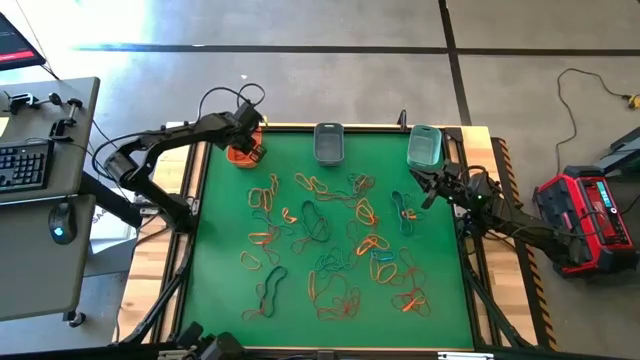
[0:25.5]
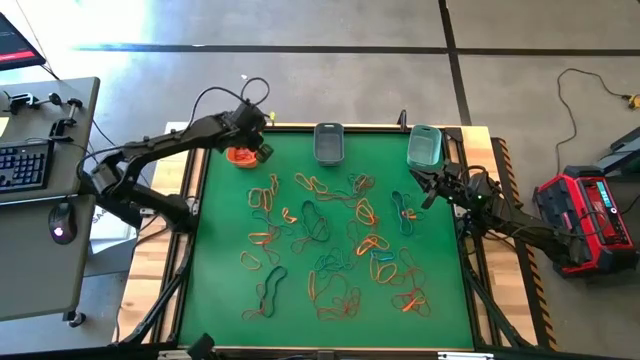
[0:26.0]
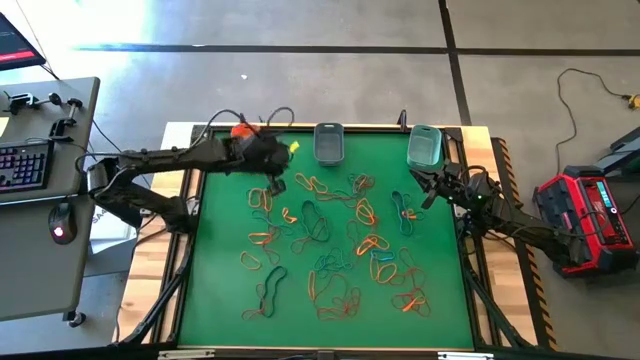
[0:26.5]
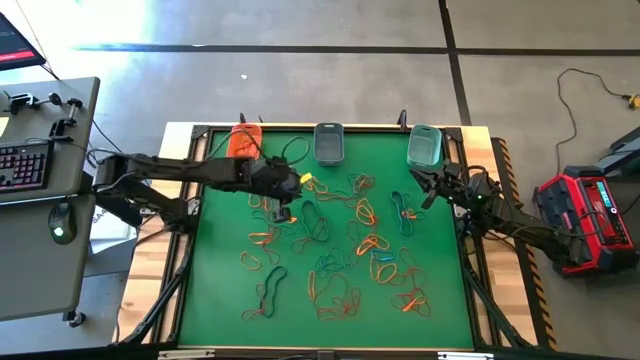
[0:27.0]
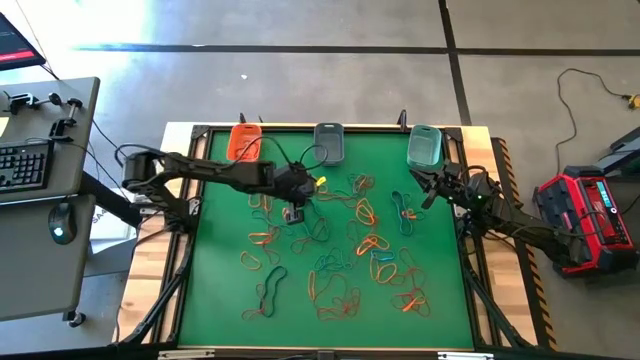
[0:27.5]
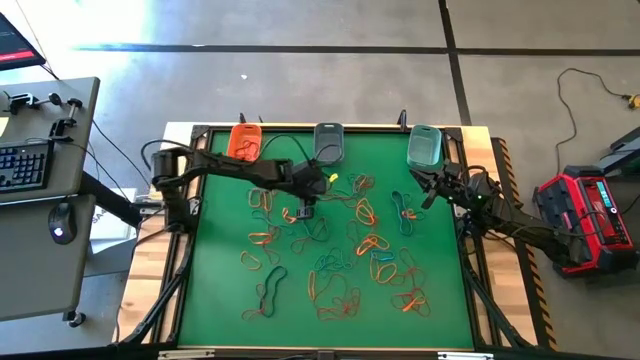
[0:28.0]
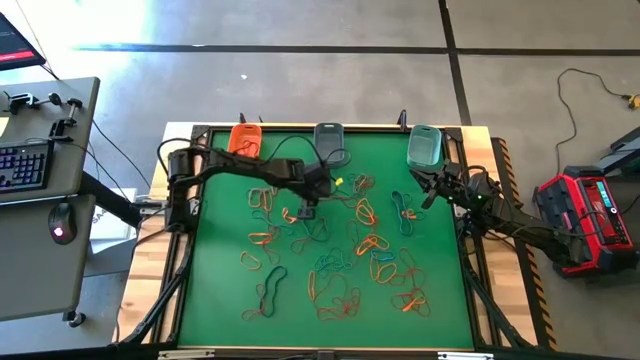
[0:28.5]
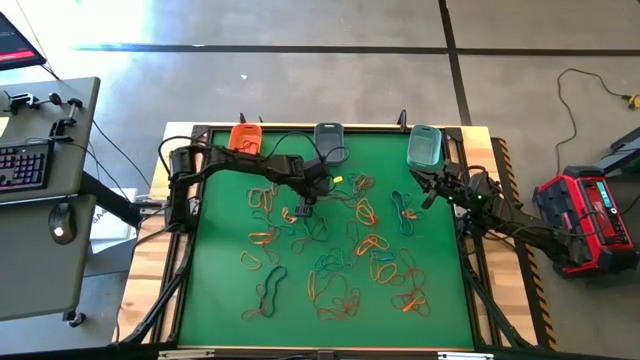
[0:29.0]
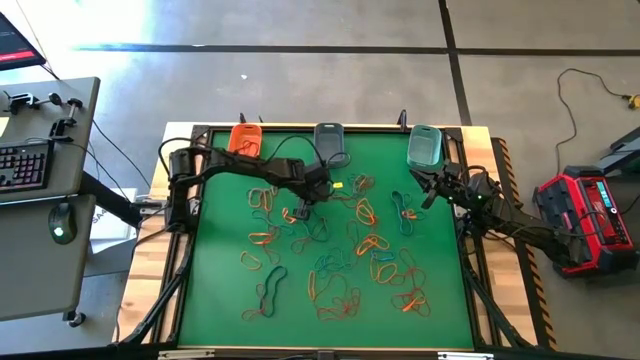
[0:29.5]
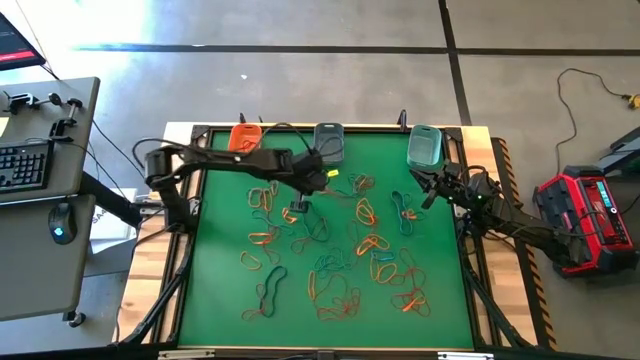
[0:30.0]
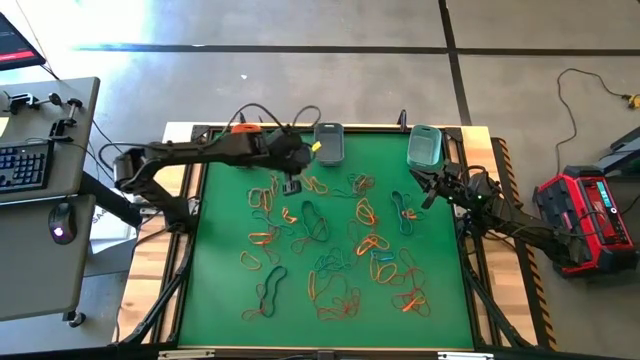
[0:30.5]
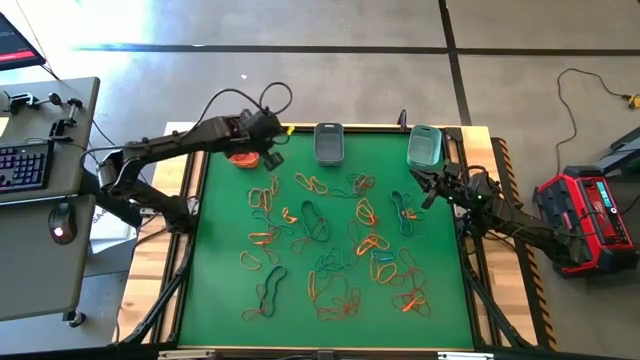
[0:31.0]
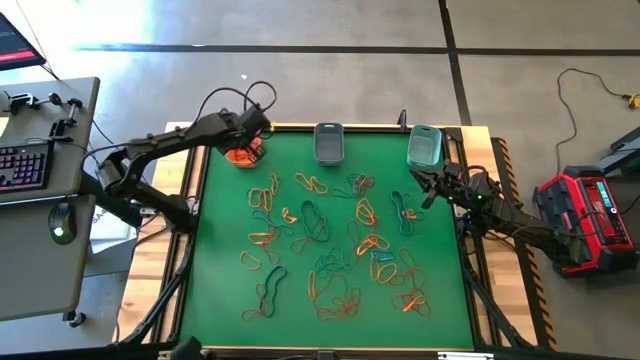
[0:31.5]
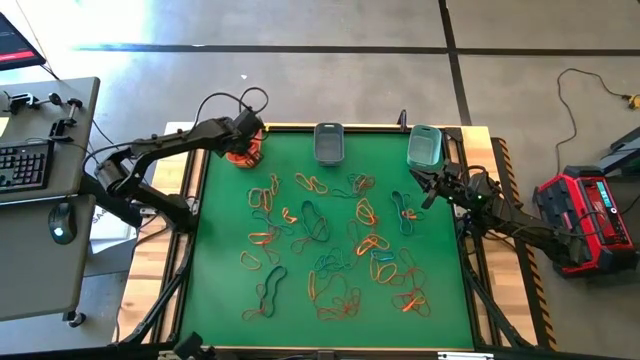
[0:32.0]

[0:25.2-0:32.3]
Task: Sort rubber bands into baskets
Put the red rubber band into the orange bin

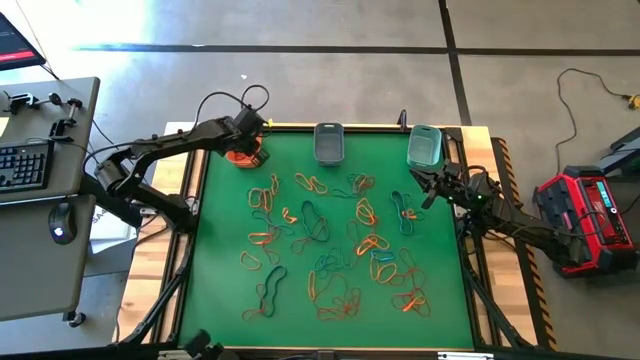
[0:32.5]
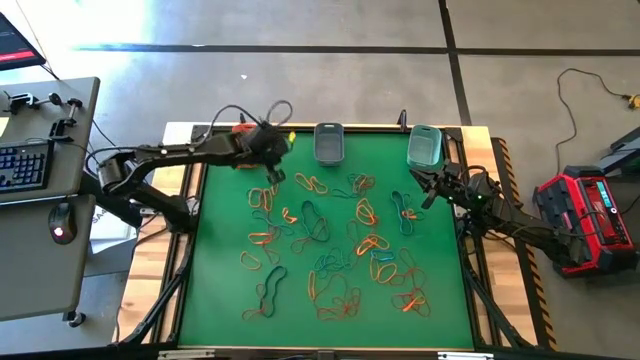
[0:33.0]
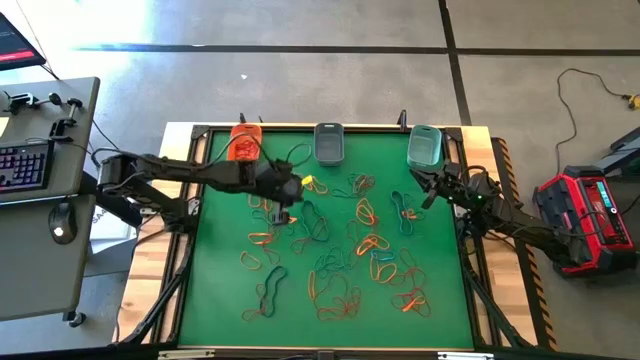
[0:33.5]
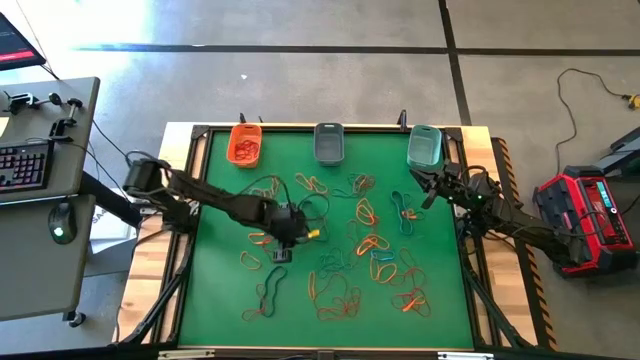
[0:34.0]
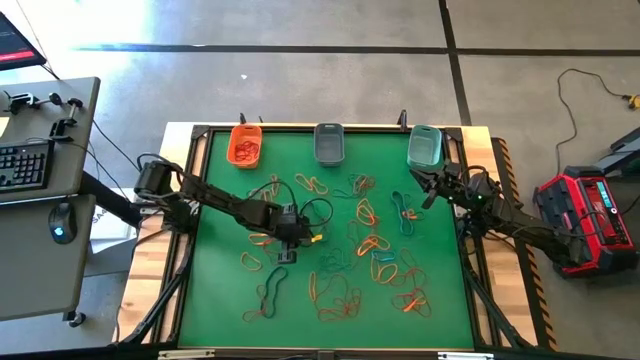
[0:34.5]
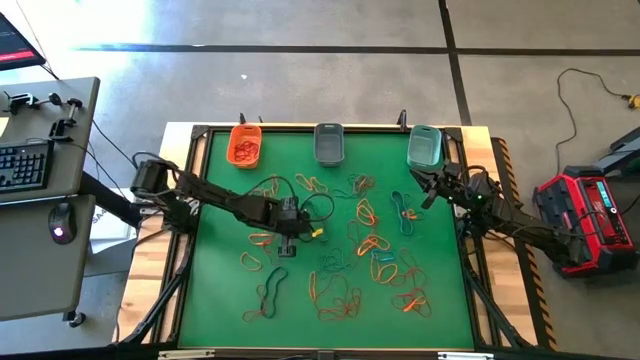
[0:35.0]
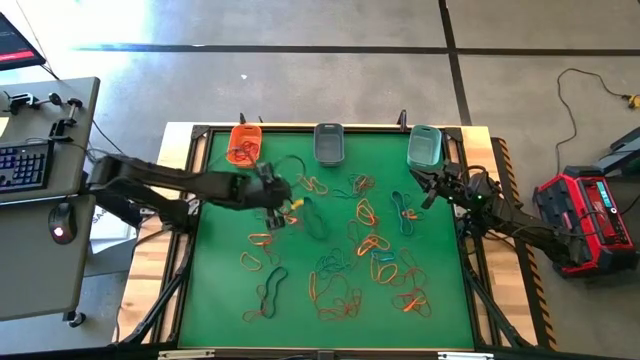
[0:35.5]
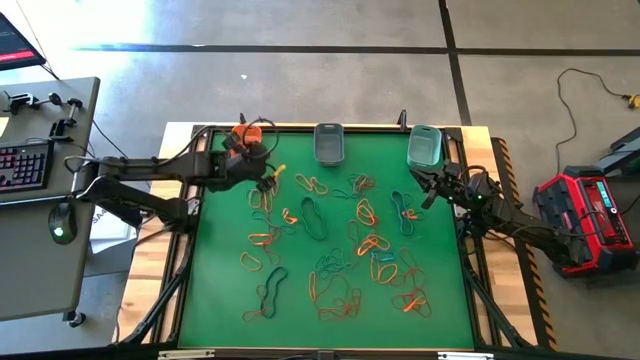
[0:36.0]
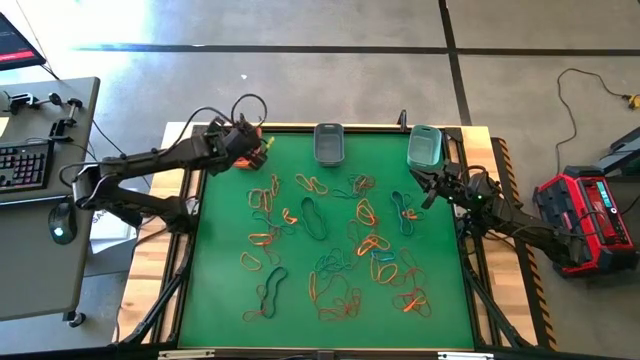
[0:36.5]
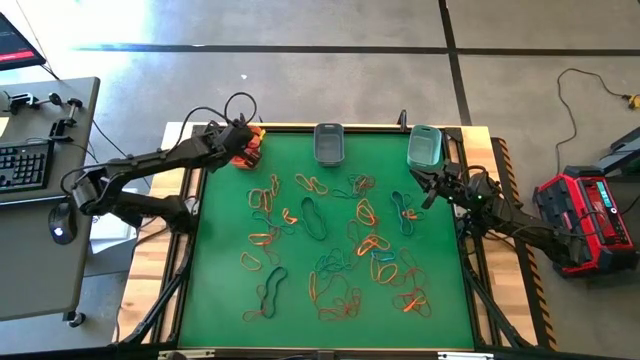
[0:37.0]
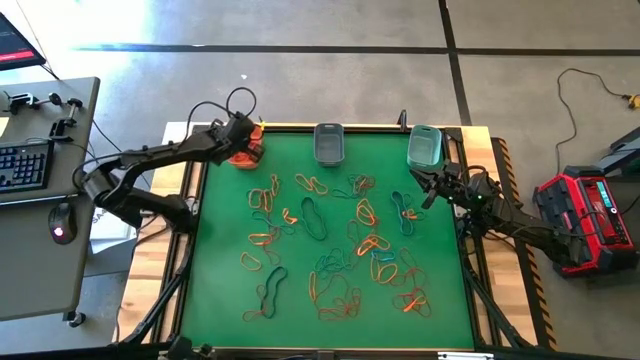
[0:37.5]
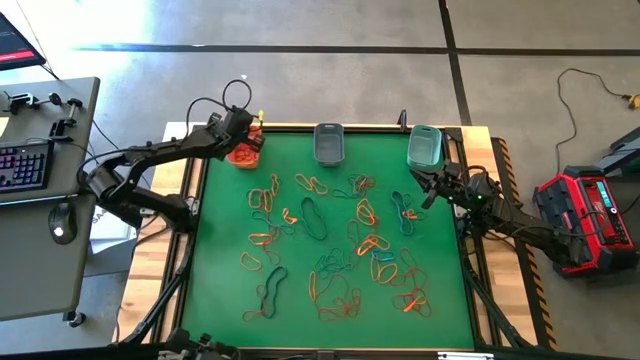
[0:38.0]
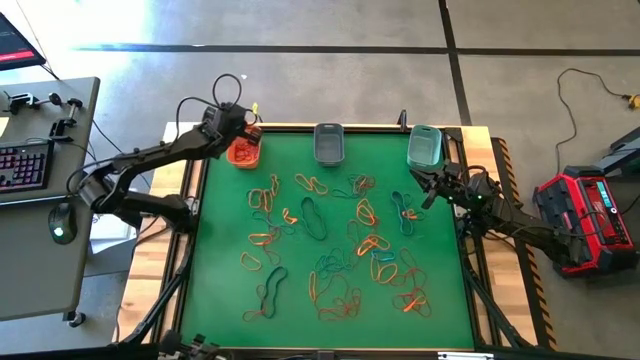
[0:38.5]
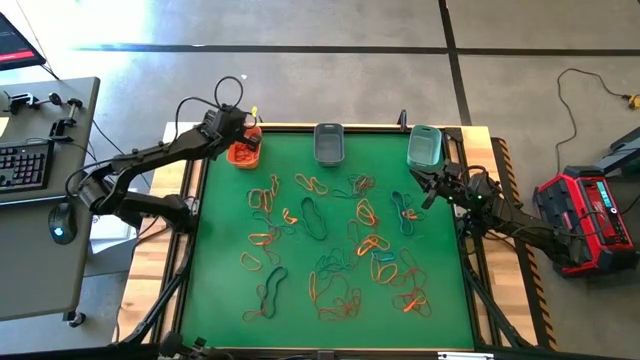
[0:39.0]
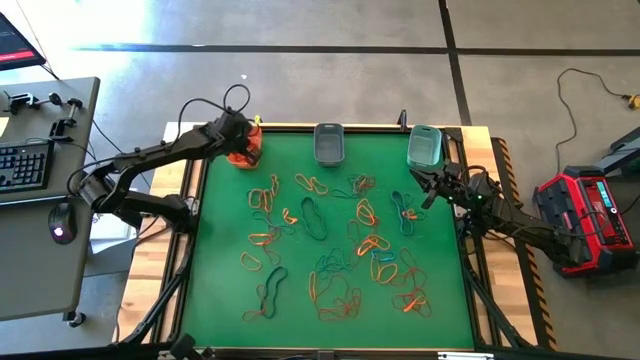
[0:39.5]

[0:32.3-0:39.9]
Put the red rubber band into the orange bin

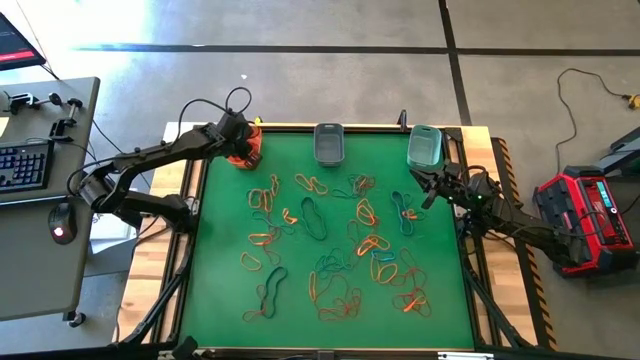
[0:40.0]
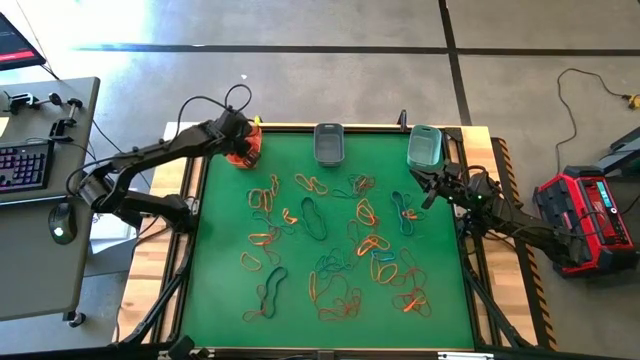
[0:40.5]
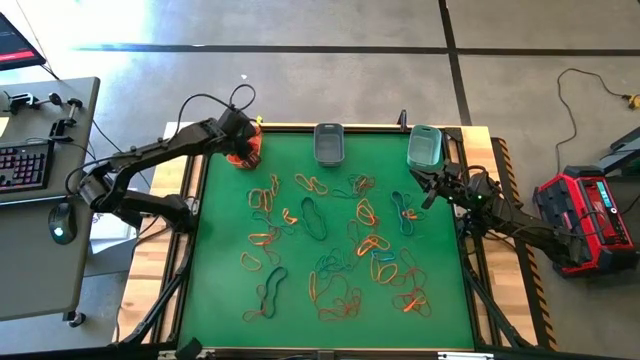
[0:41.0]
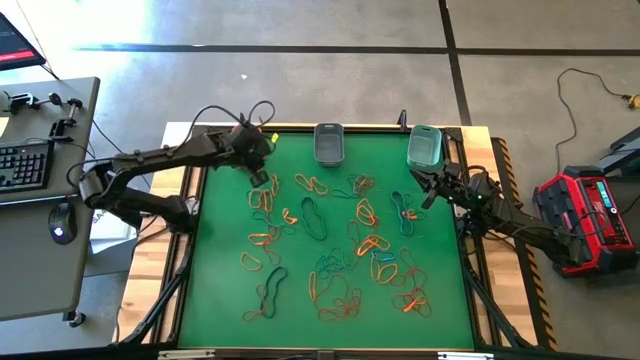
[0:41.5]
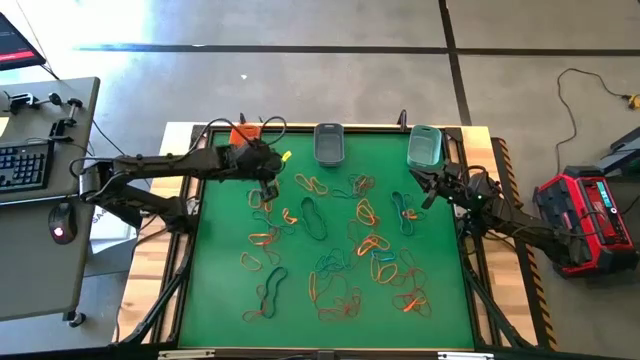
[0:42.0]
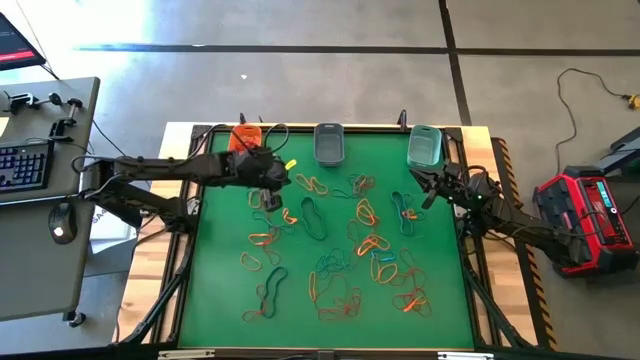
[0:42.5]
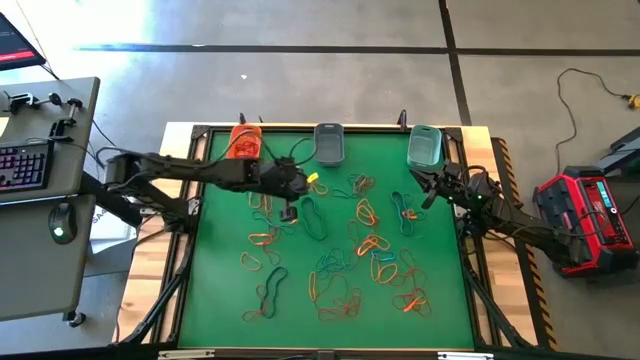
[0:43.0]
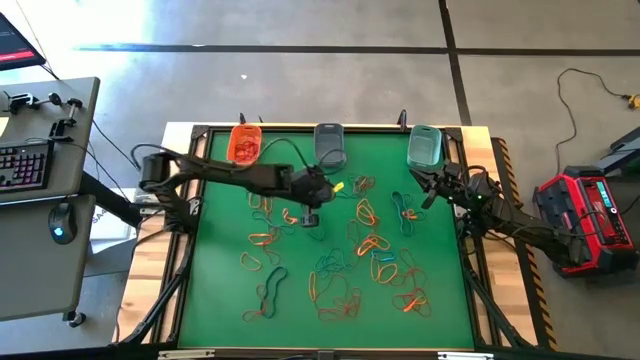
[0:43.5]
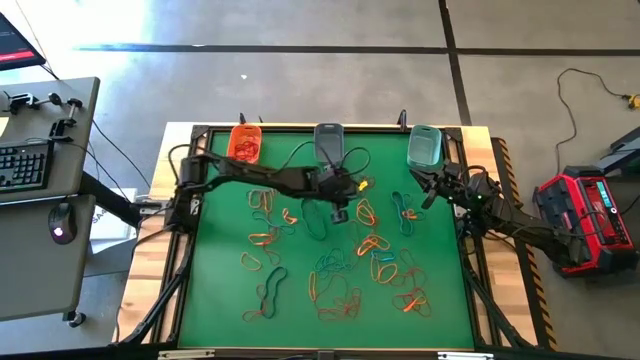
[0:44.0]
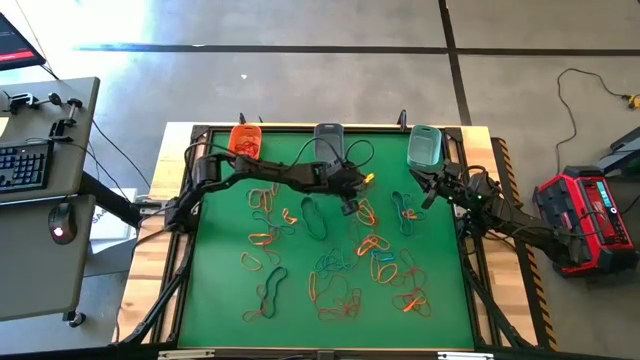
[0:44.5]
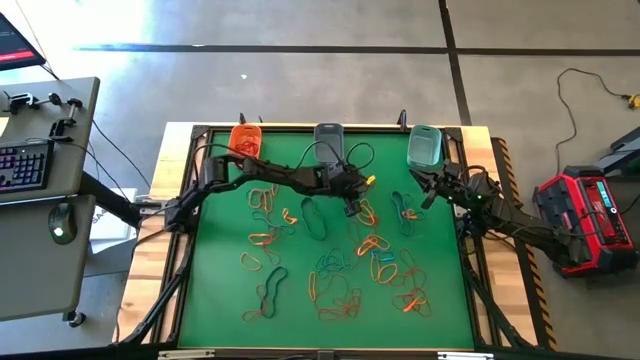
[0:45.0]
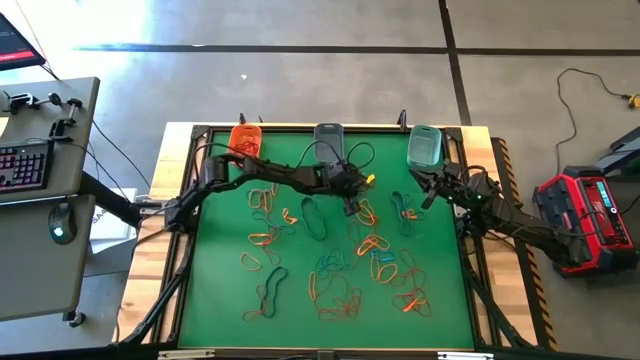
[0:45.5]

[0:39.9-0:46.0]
Put the red rubber band into the orange bin
